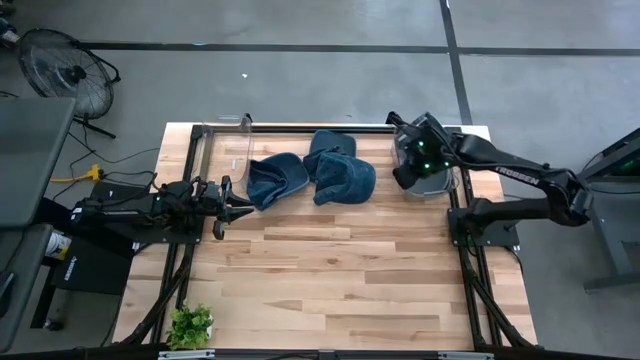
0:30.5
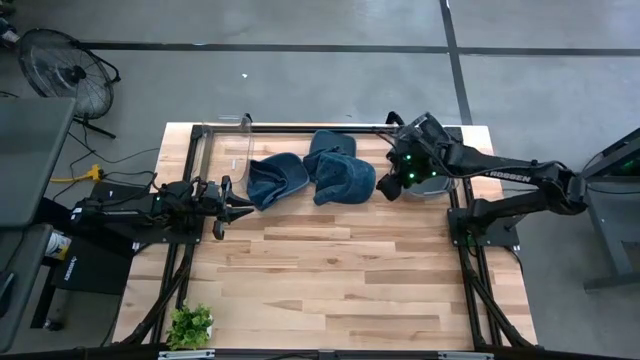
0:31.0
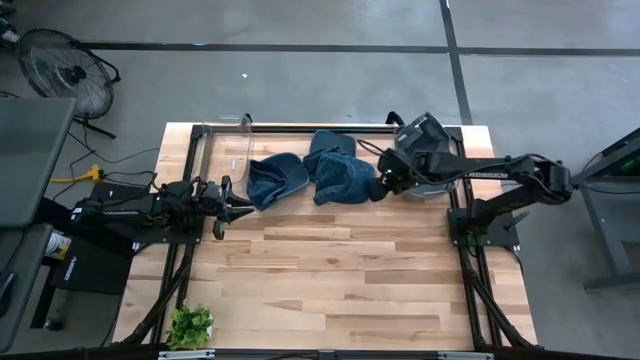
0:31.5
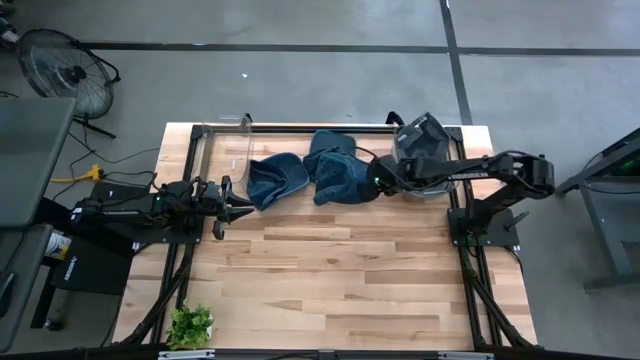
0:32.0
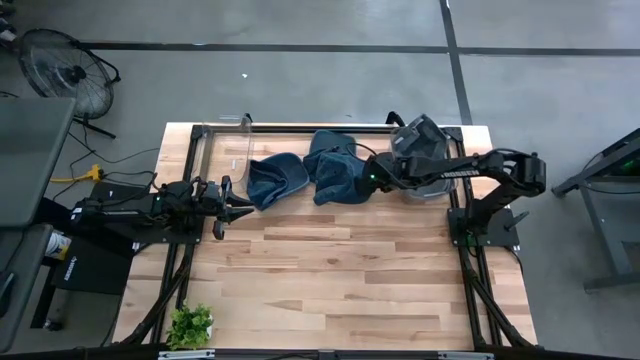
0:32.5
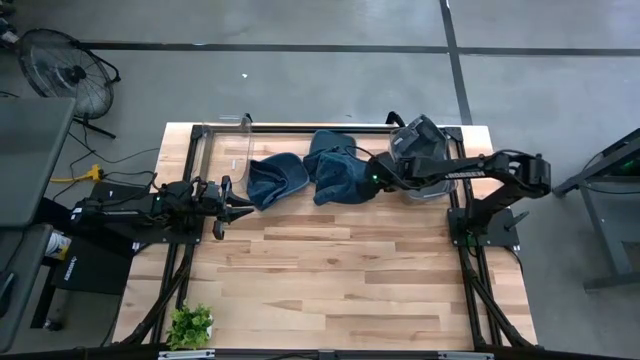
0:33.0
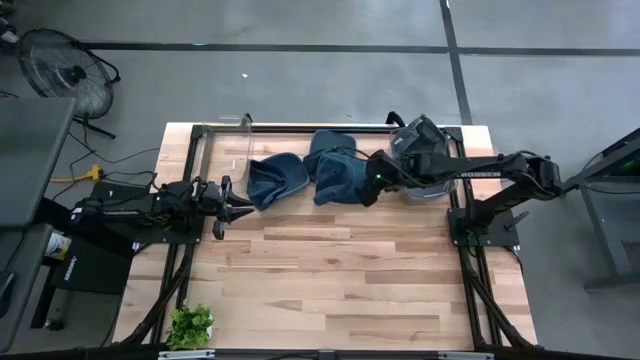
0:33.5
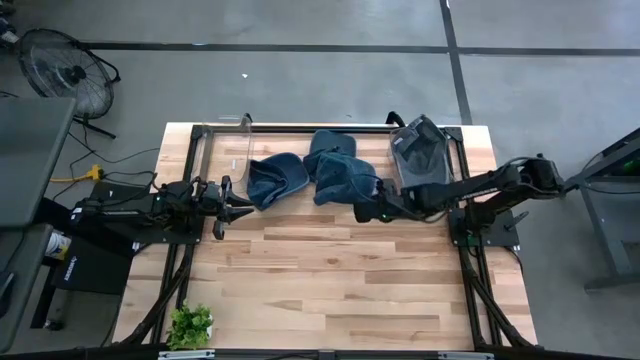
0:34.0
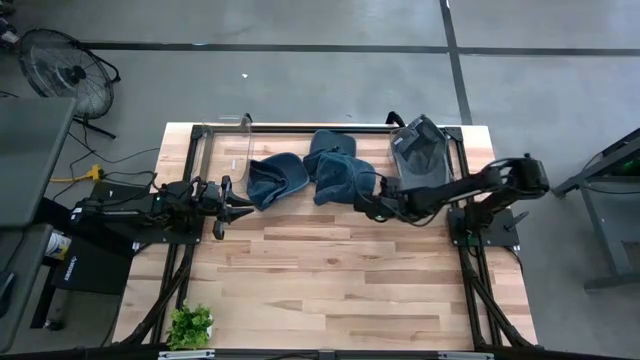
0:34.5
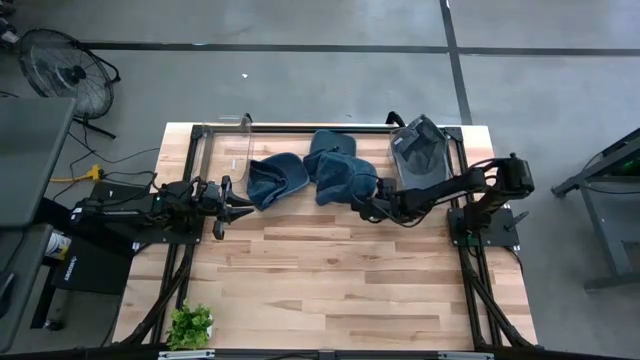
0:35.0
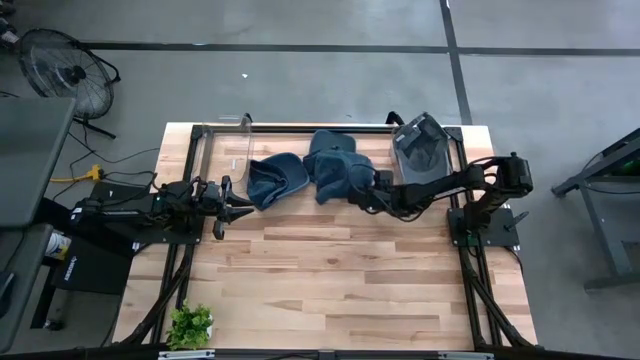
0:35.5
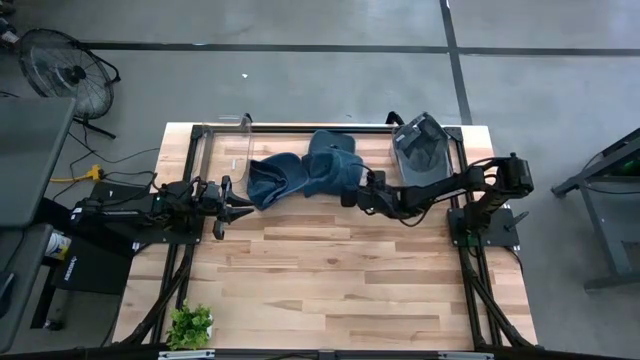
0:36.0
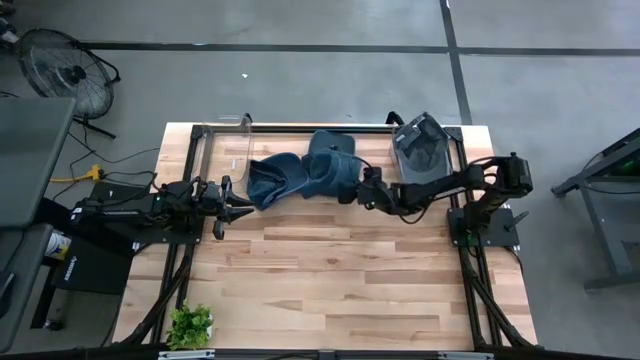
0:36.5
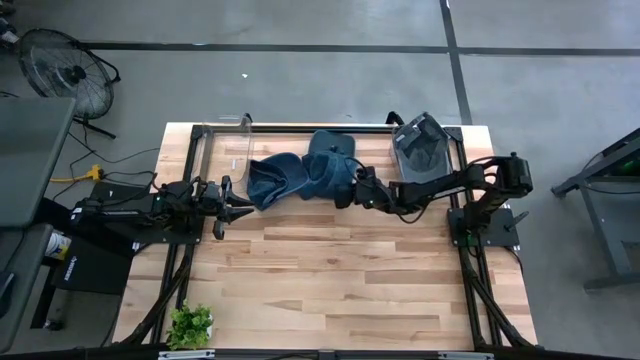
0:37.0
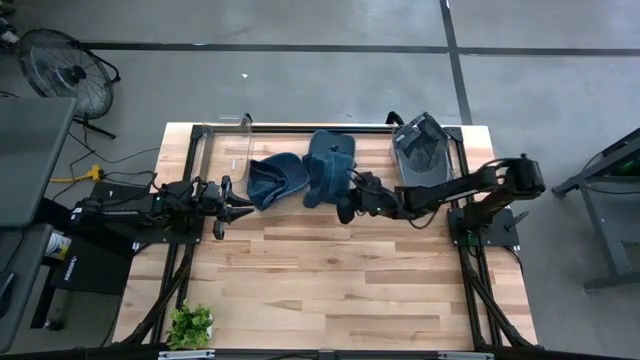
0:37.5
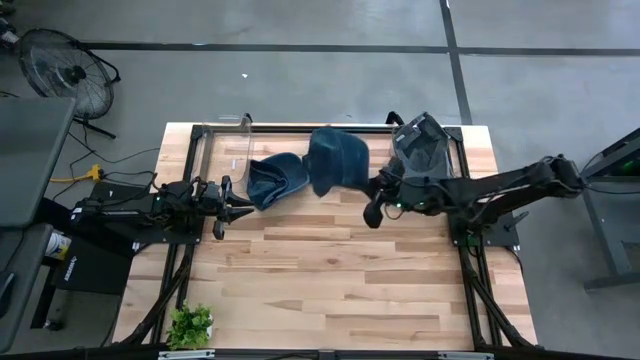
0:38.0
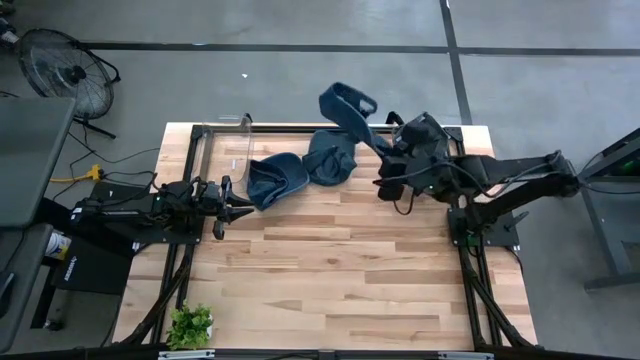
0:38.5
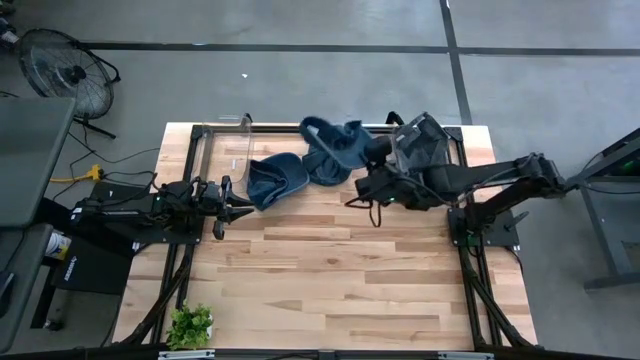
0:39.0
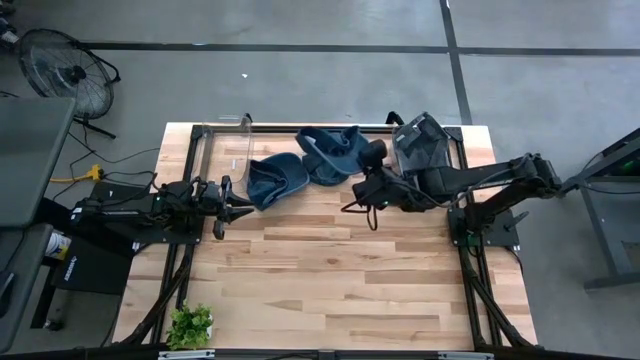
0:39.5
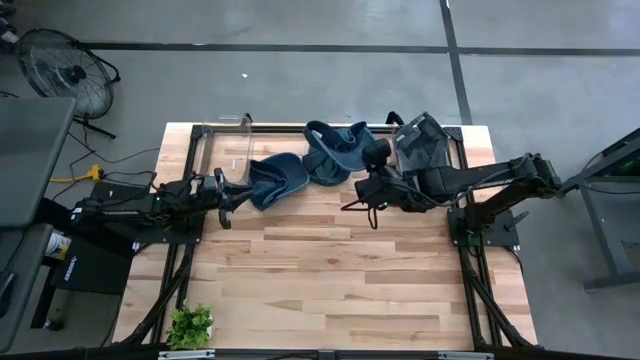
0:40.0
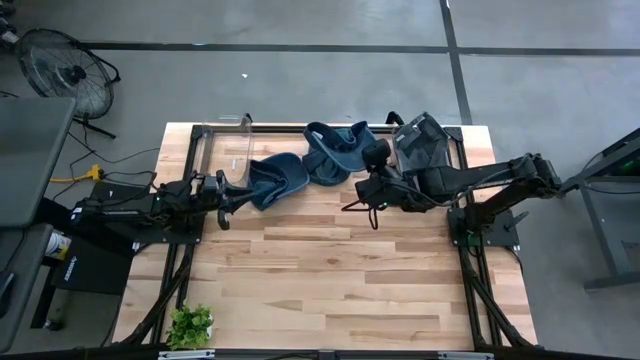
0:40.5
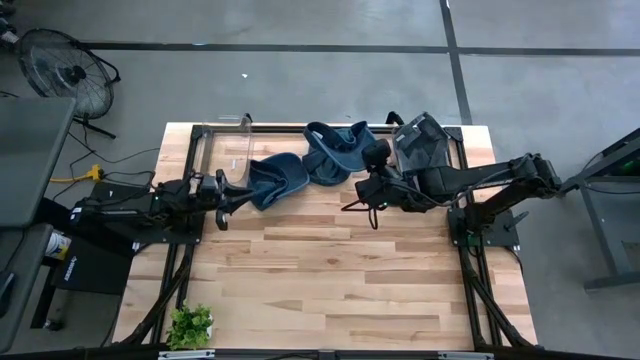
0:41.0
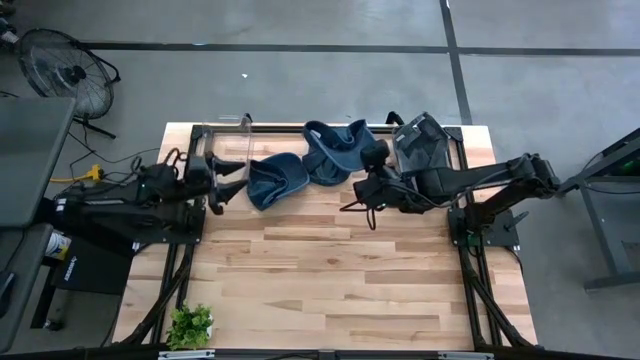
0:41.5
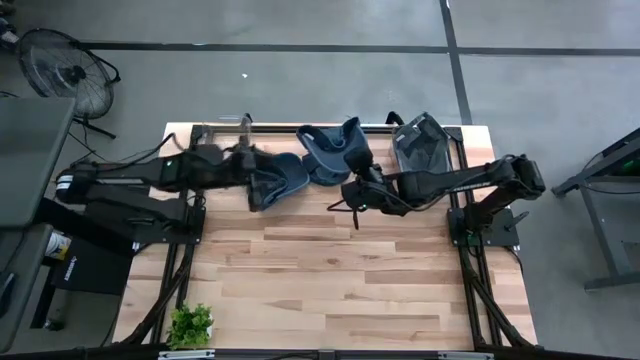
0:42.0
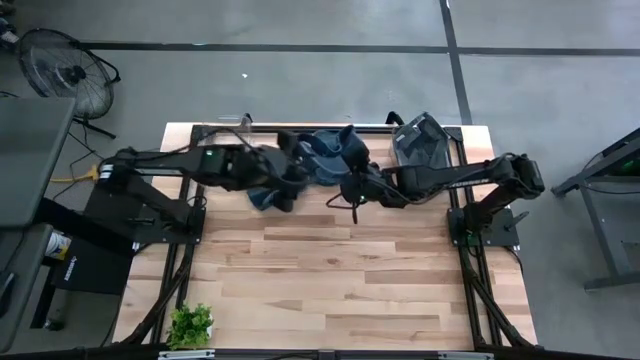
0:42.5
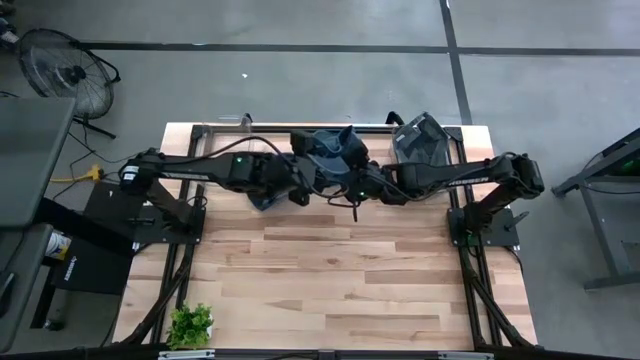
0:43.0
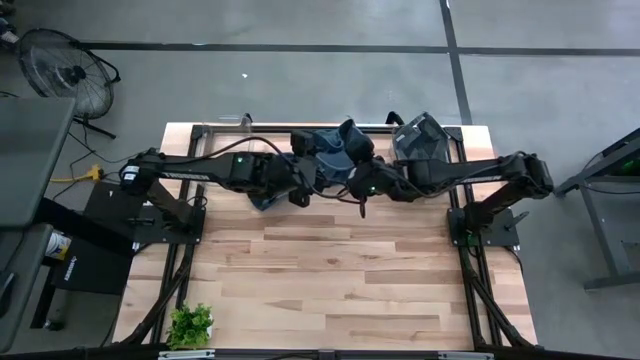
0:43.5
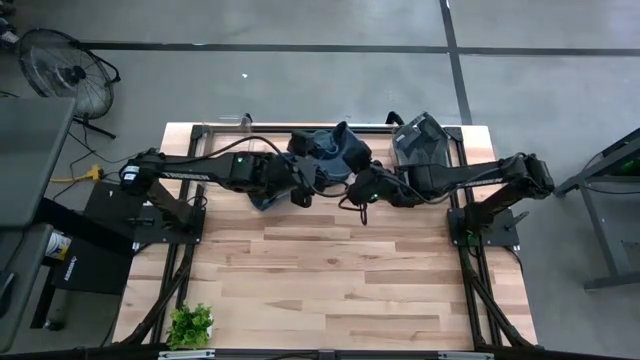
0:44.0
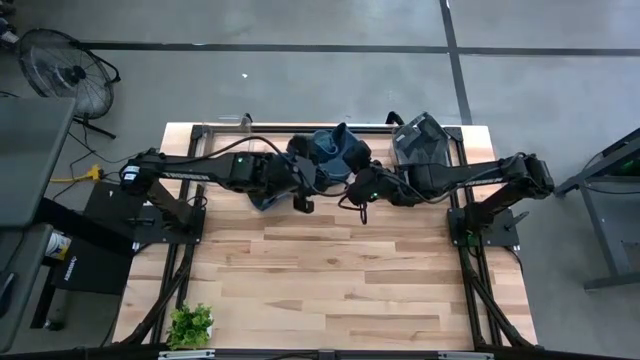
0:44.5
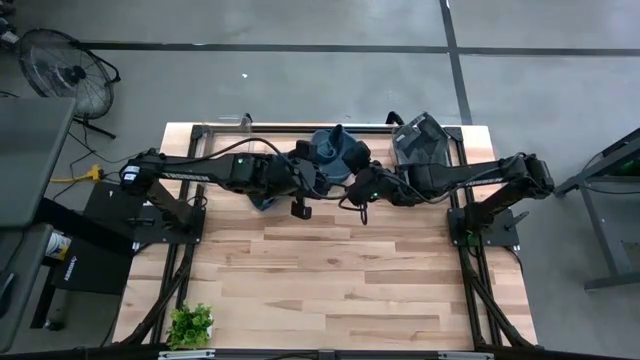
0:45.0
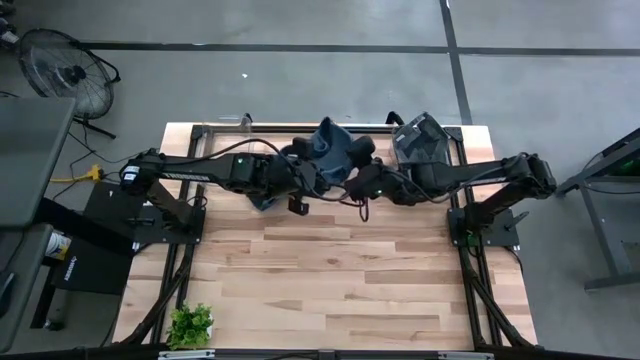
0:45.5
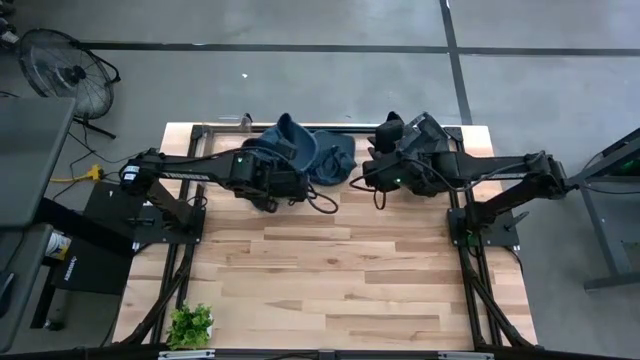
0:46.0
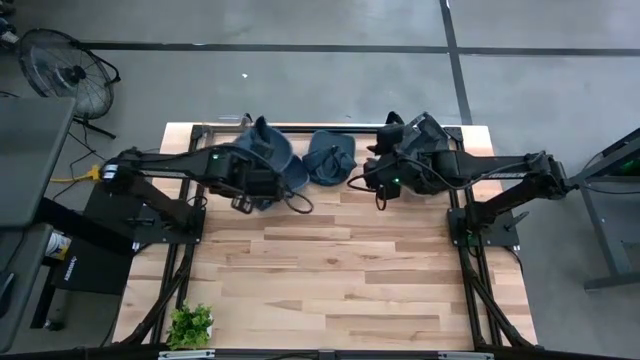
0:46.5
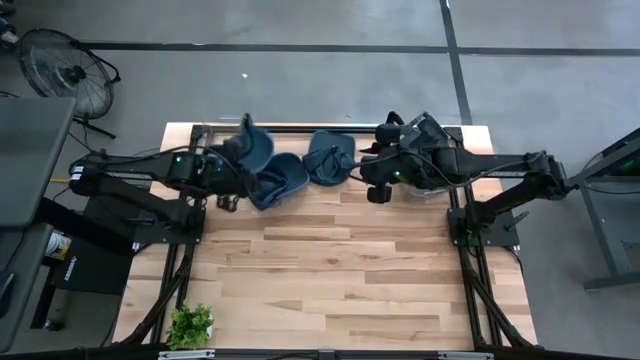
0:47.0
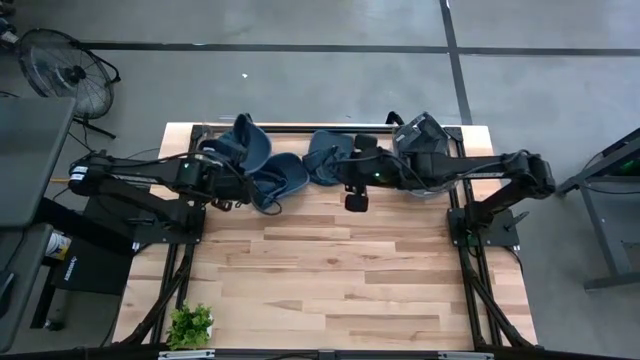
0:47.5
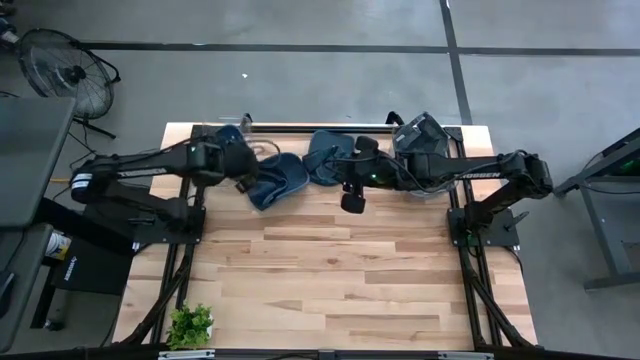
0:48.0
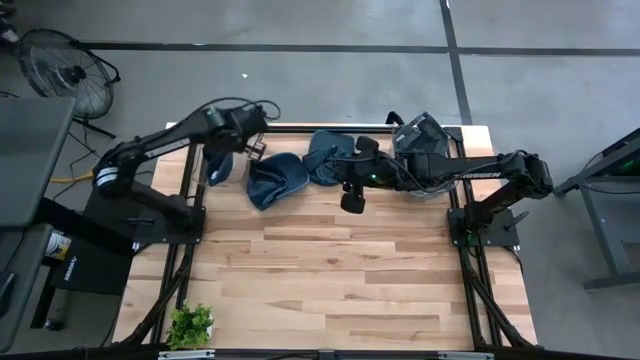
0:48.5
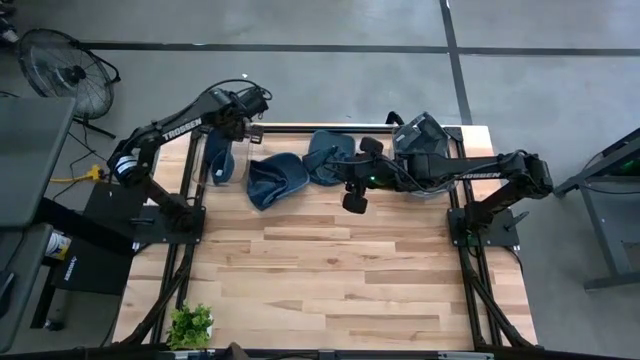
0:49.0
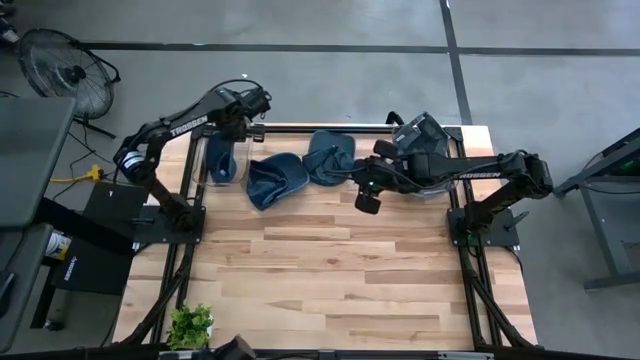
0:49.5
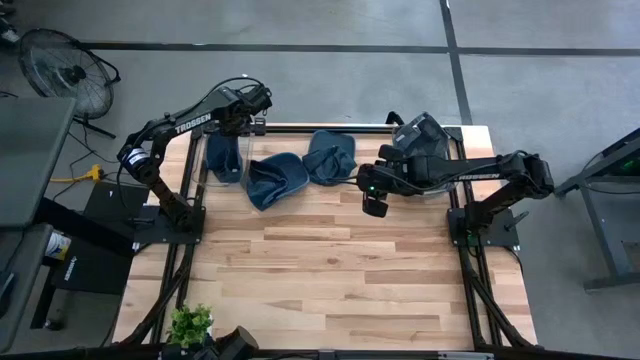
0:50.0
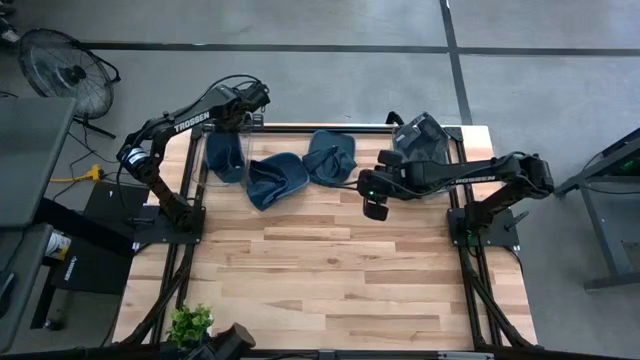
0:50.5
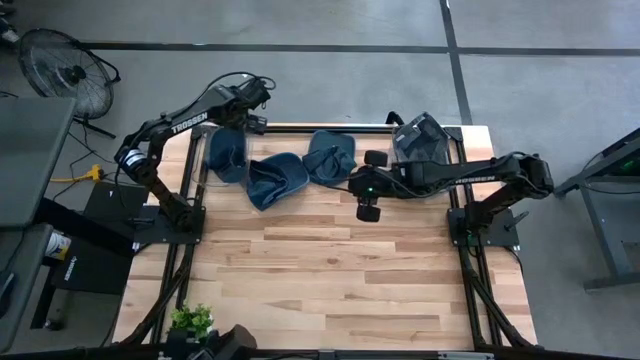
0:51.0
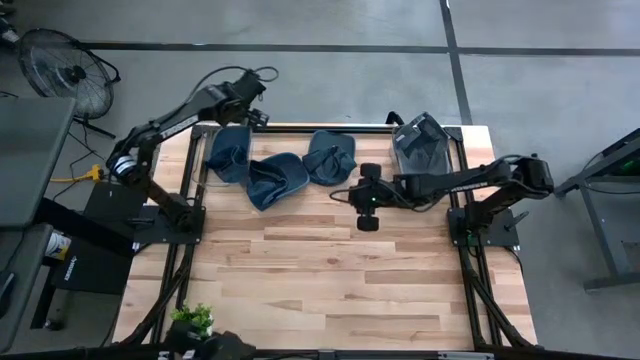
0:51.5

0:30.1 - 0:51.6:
Task: Pick & Place hat
Put the bottom right blue cap into the left transparent bin
